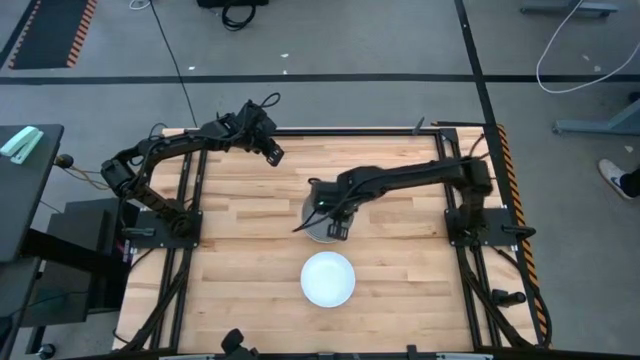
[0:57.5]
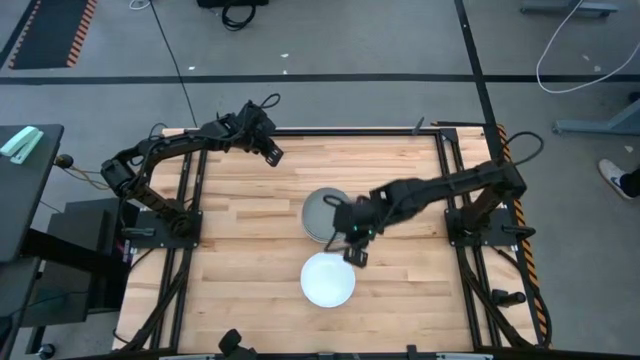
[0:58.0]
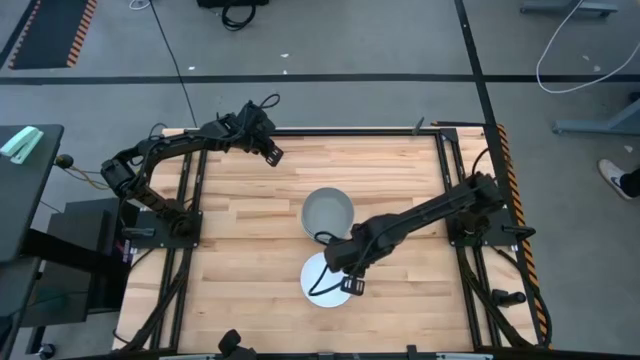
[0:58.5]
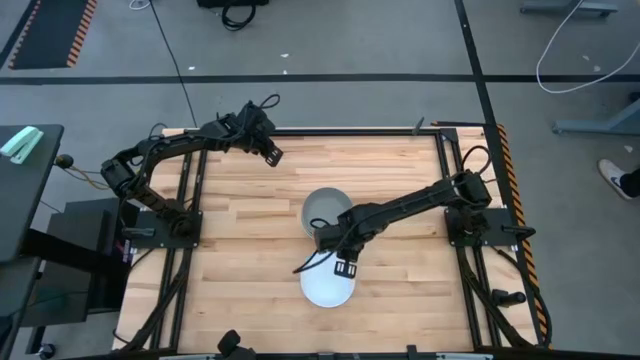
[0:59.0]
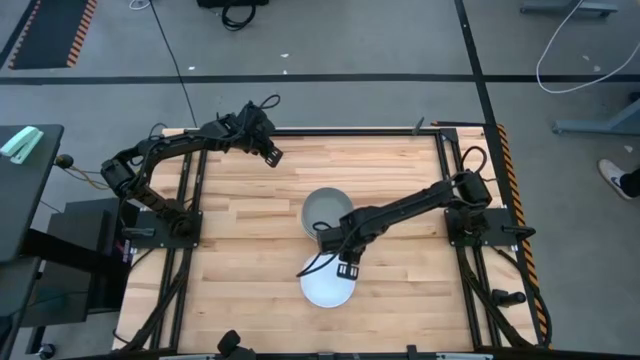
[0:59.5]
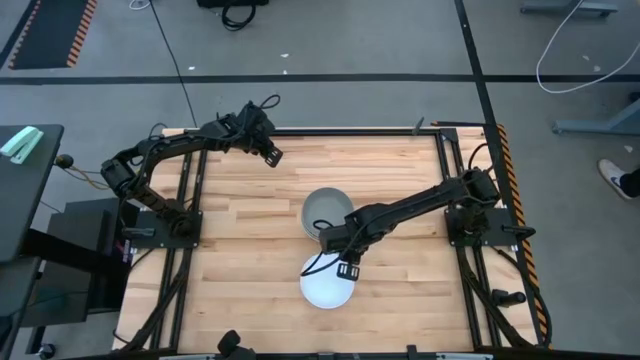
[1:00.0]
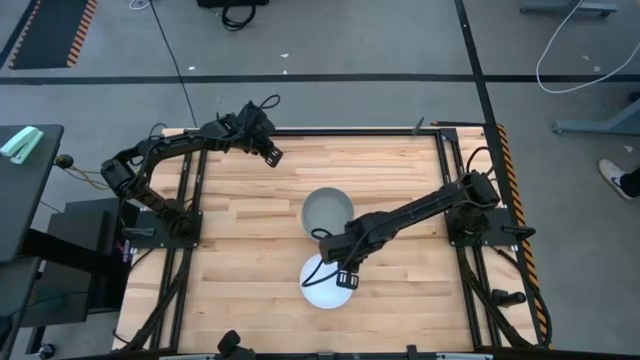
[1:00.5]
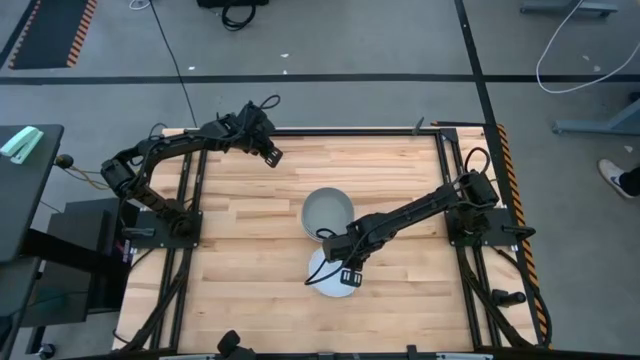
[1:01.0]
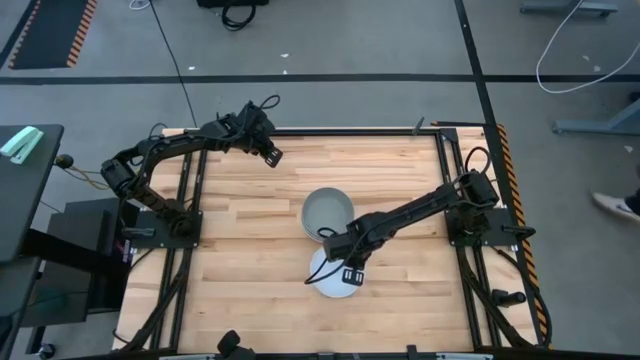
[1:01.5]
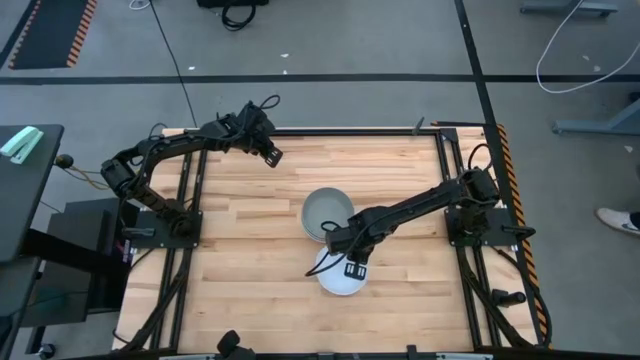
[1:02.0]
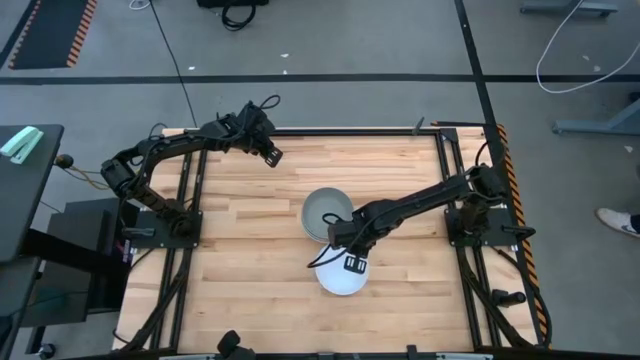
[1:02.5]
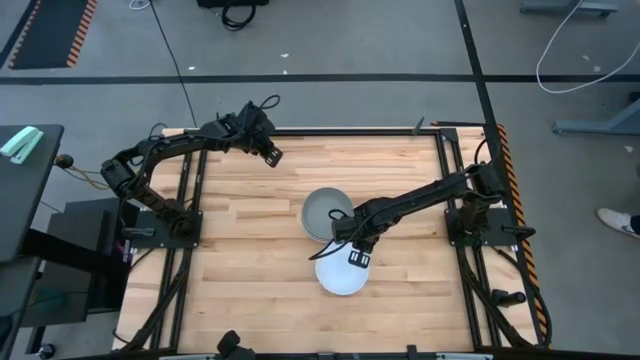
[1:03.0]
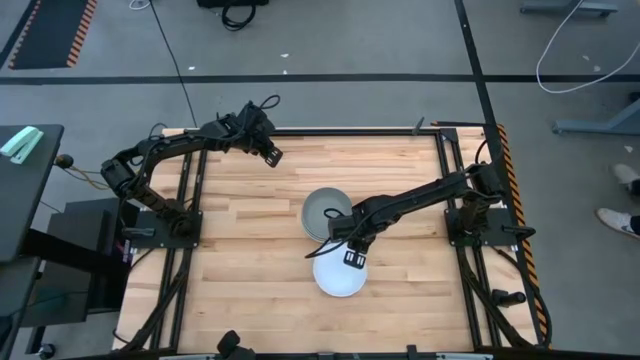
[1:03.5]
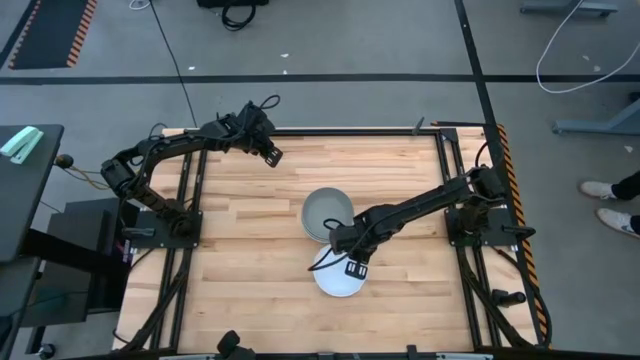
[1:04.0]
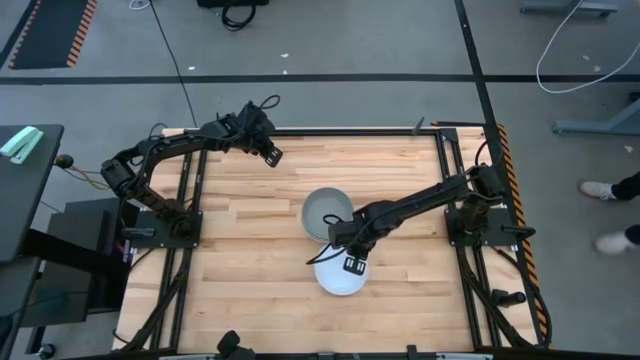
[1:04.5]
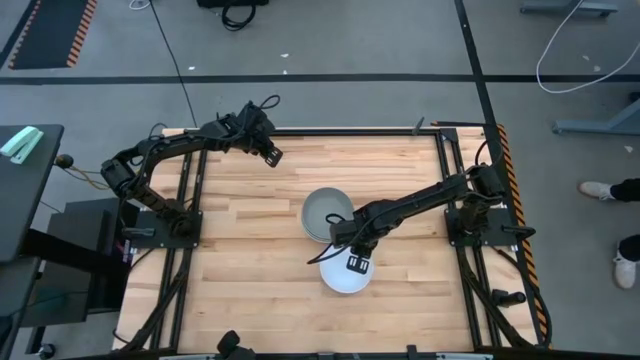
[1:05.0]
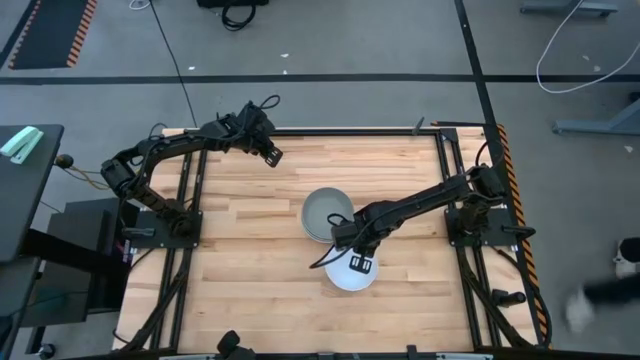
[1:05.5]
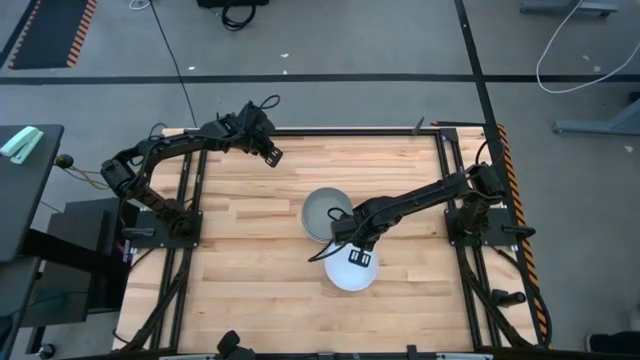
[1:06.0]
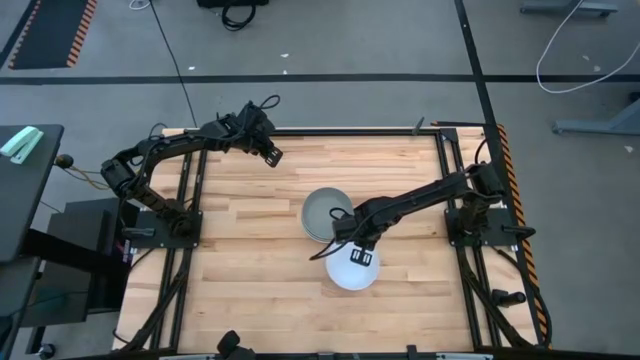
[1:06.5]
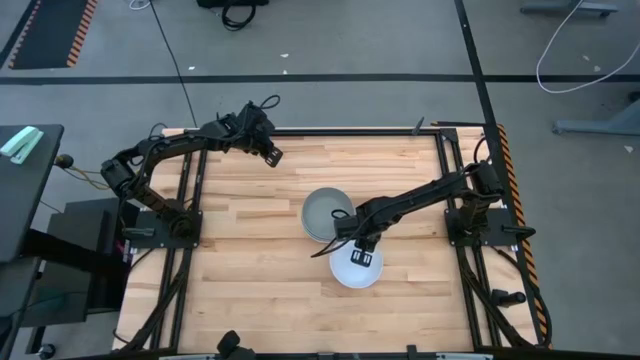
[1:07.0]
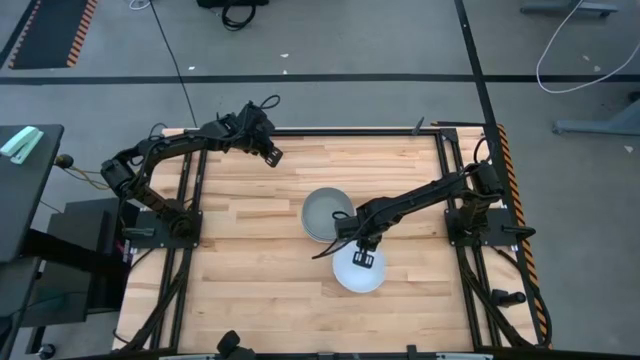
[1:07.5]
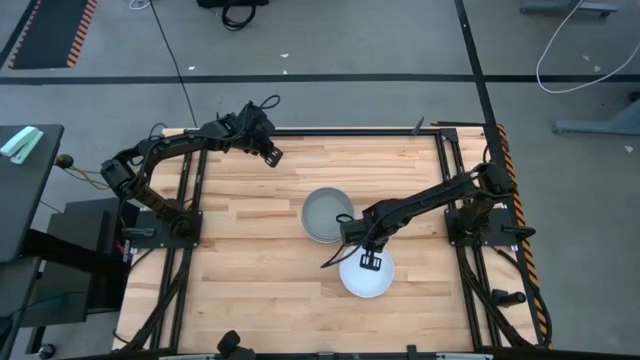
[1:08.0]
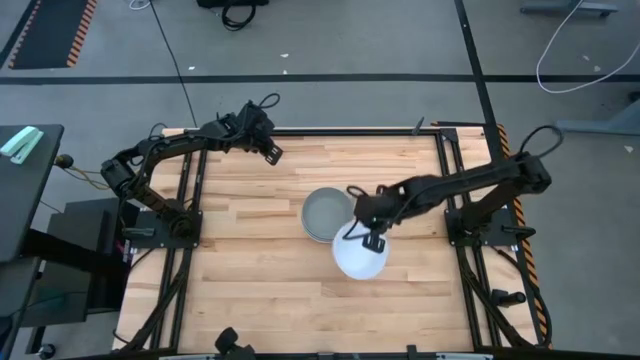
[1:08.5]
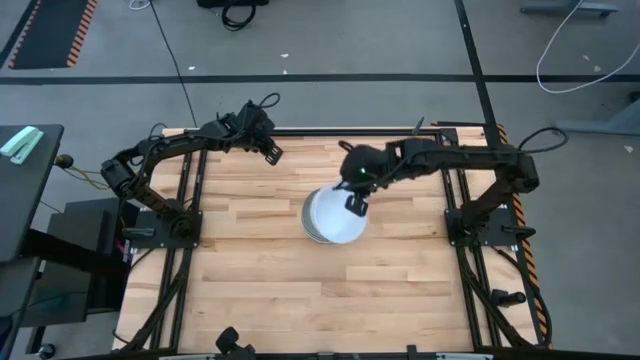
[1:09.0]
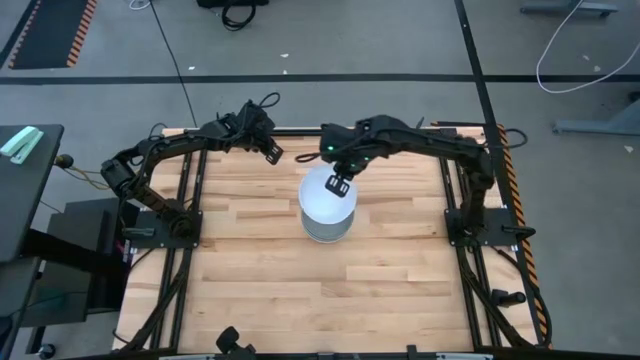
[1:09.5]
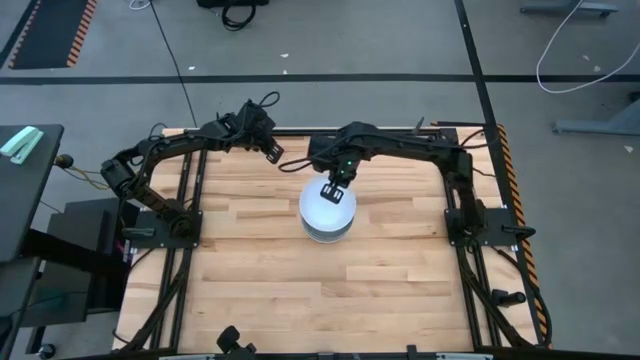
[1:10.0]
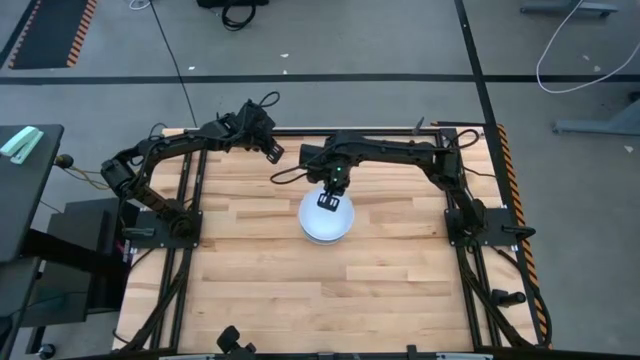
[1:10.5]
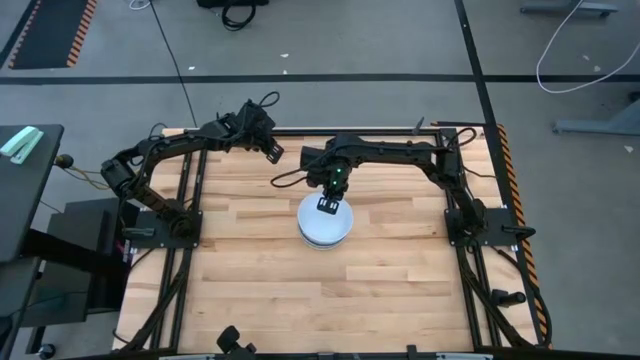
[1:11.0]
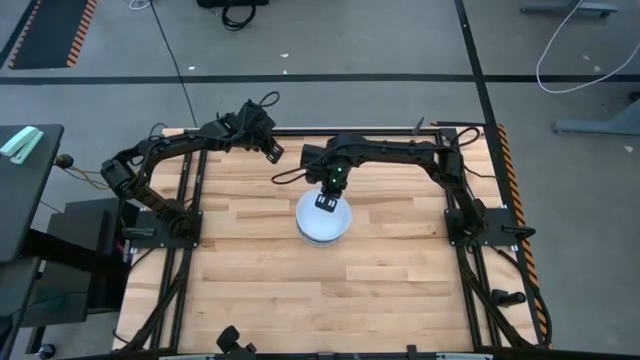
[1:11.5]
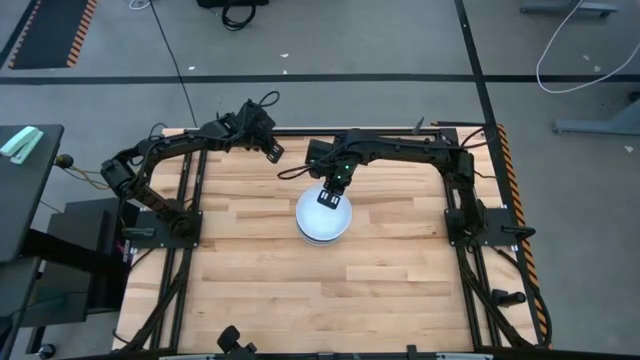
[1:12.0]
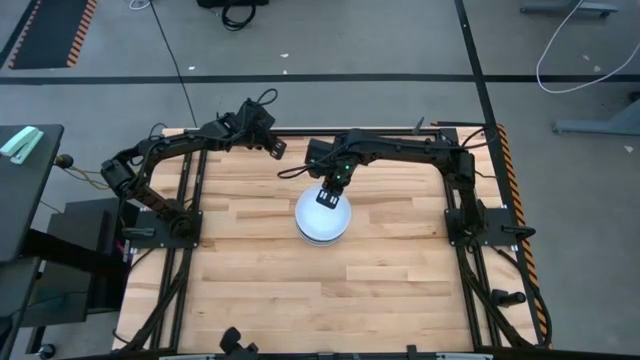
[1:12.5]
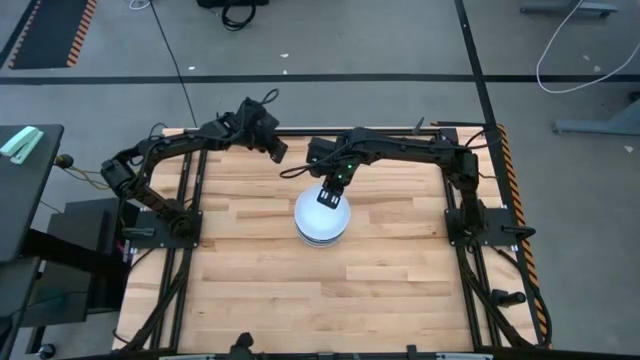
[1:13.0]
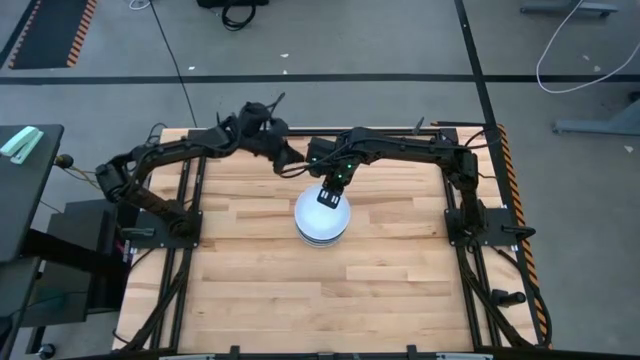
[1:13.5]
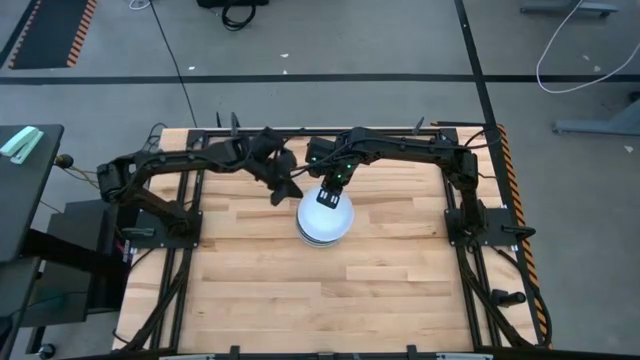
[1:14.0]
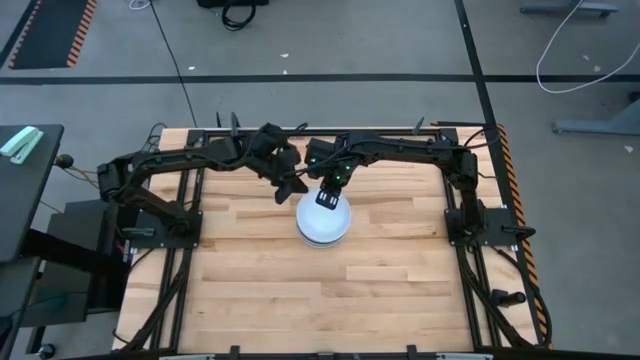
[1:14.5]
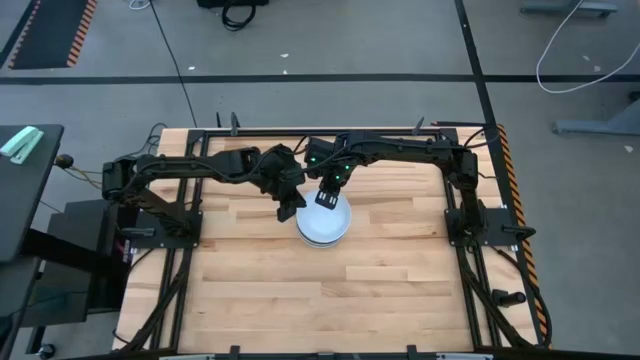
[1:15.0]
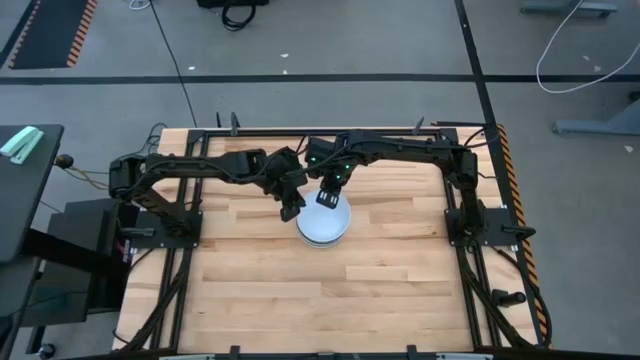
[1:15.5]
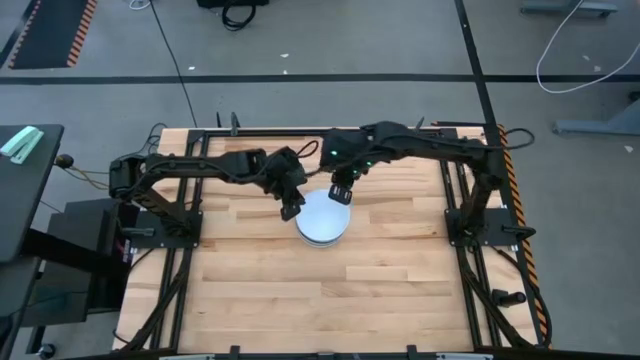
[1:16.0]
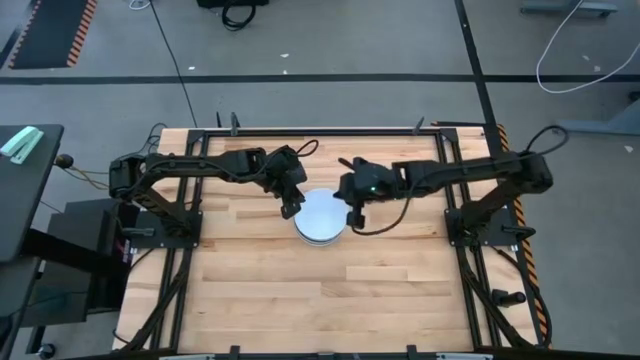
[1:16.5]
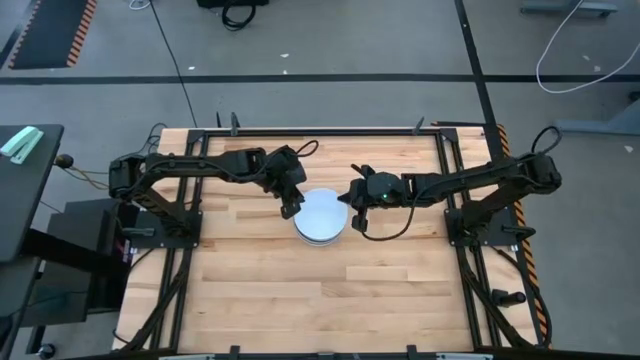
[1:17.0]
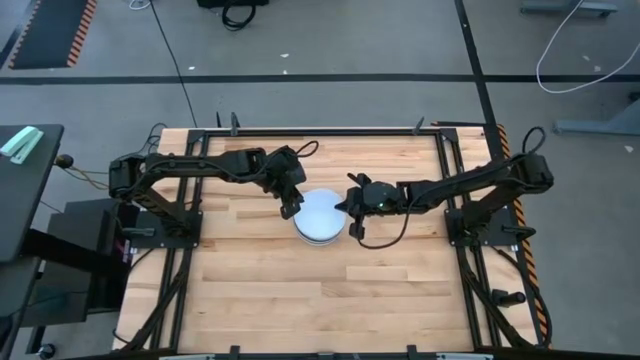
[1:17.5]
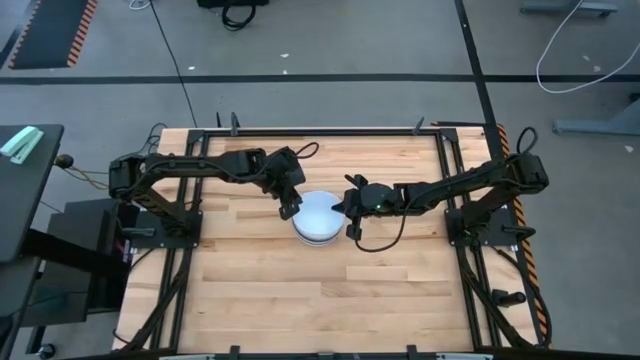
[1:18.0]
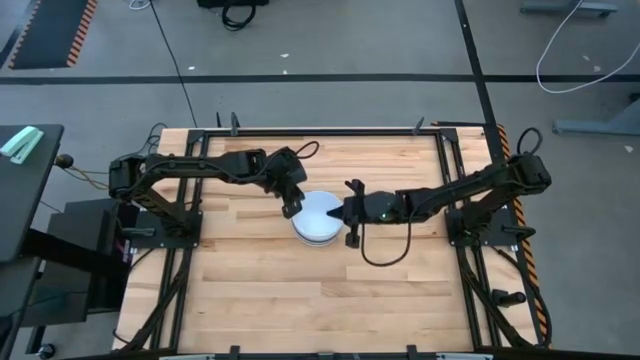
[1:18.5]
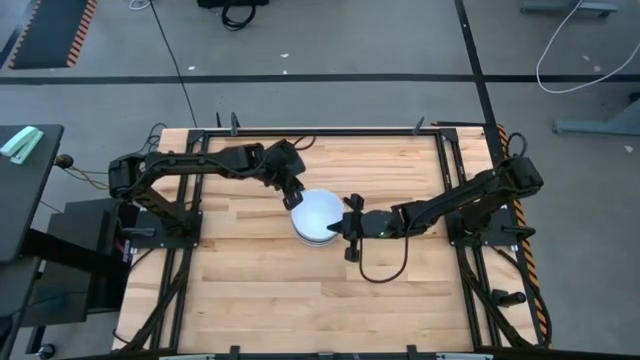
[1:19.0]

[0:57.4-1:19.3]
Task: Nest bowls inside each other
Stack the white bowl on the stacked bowl
